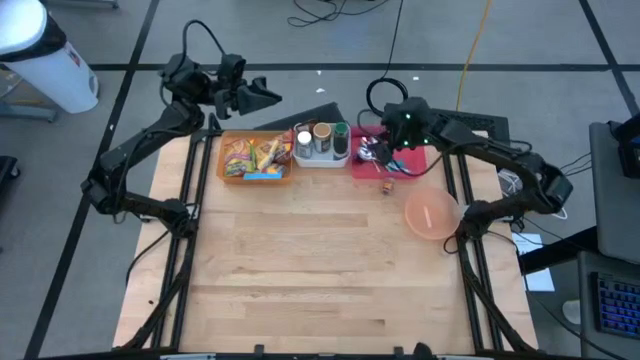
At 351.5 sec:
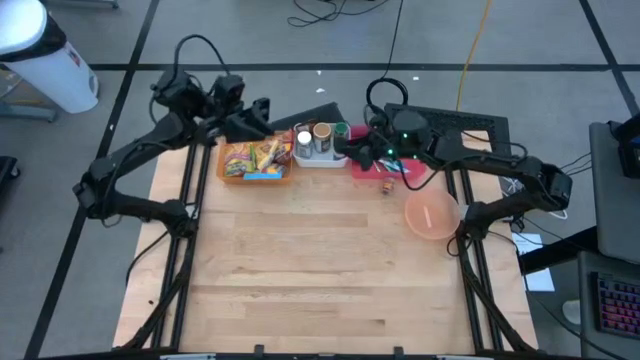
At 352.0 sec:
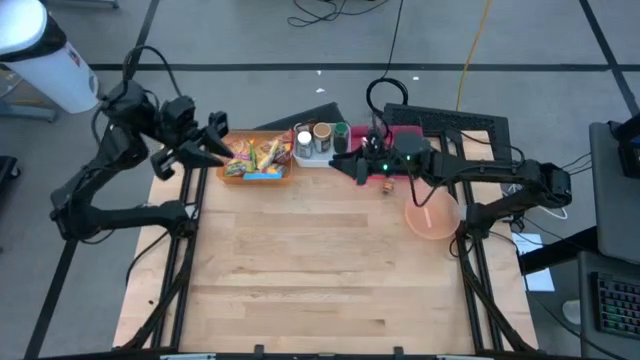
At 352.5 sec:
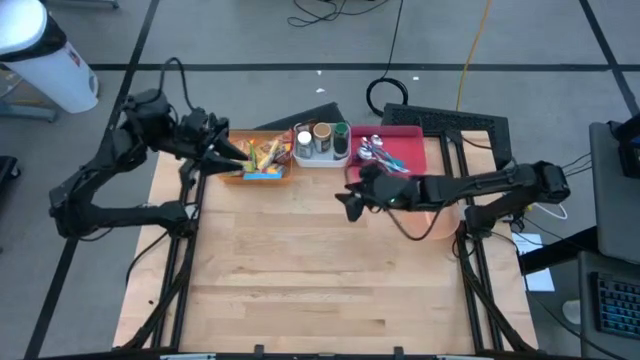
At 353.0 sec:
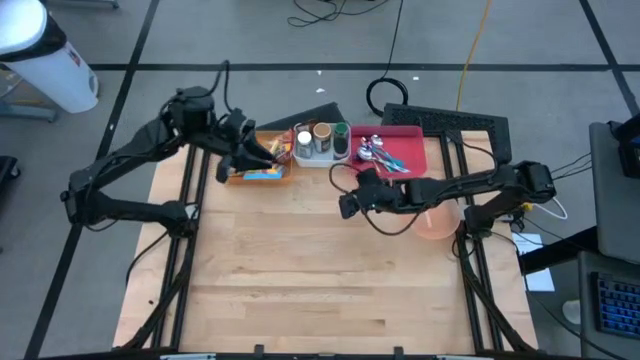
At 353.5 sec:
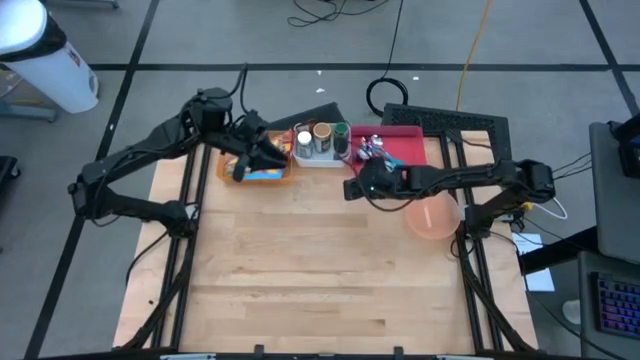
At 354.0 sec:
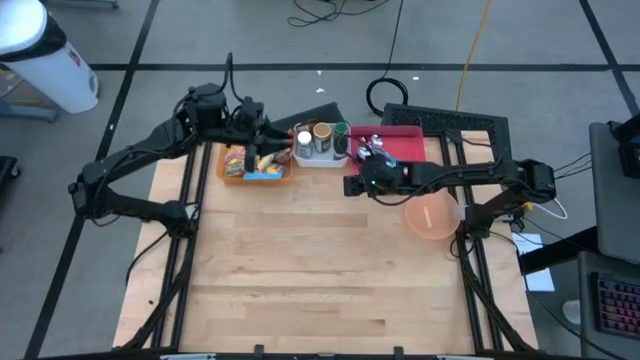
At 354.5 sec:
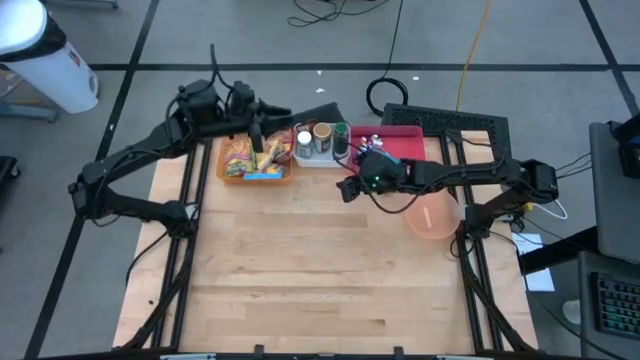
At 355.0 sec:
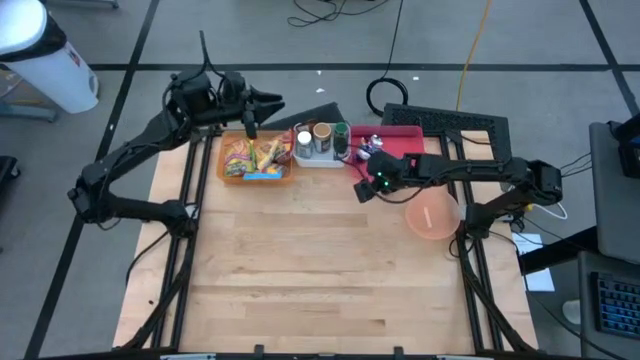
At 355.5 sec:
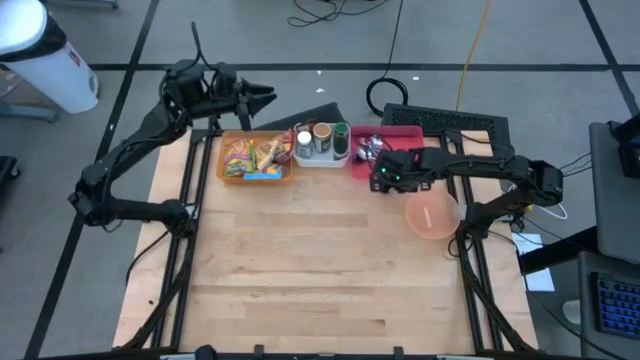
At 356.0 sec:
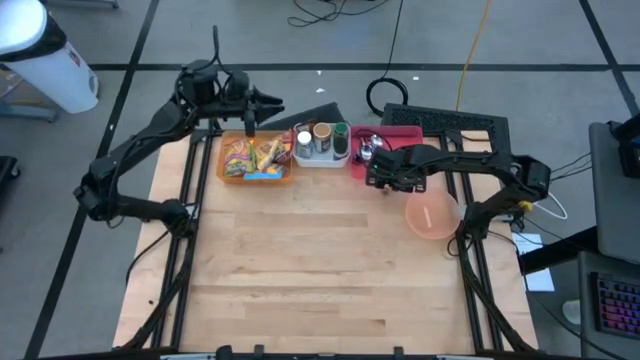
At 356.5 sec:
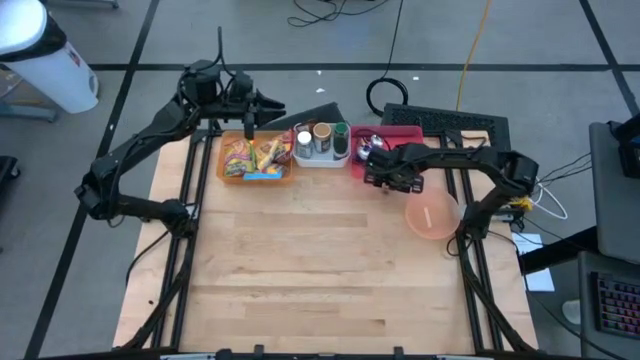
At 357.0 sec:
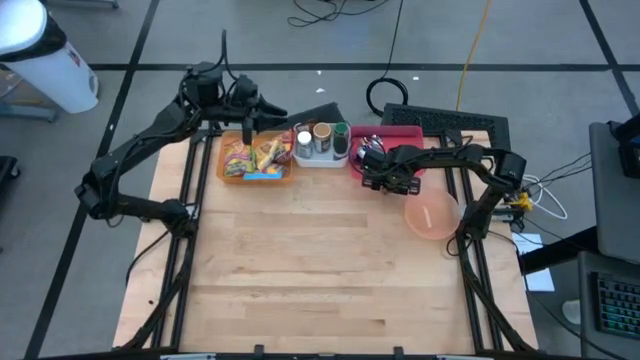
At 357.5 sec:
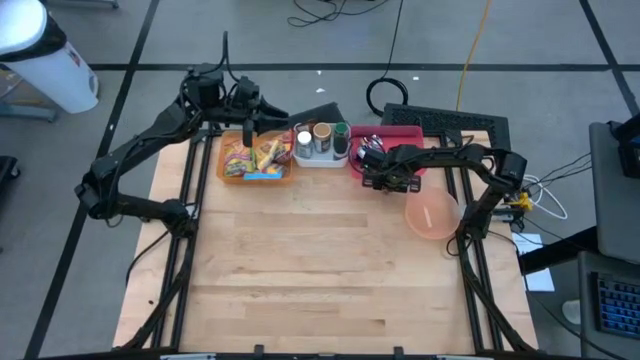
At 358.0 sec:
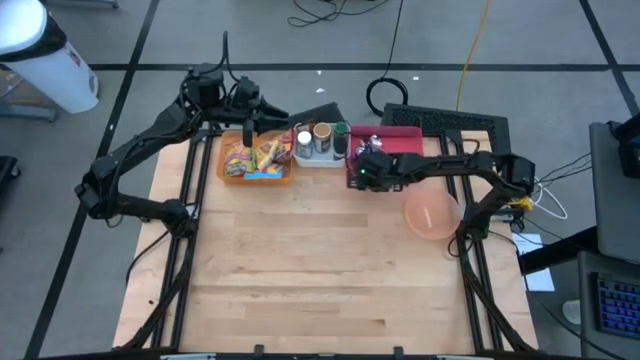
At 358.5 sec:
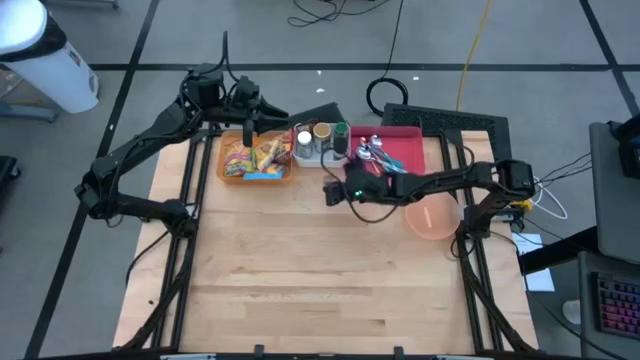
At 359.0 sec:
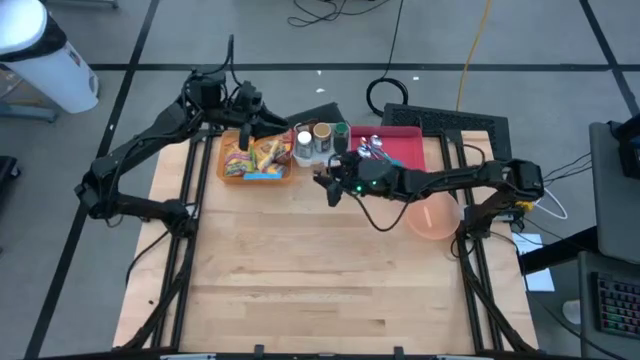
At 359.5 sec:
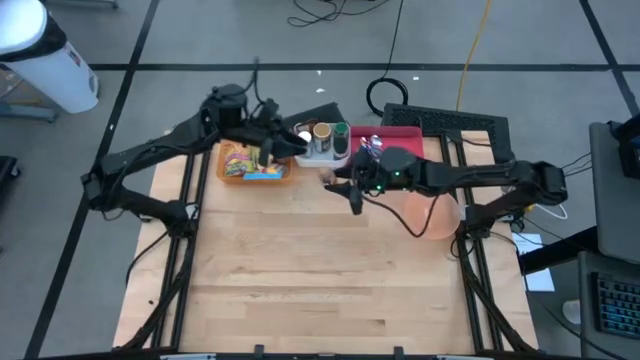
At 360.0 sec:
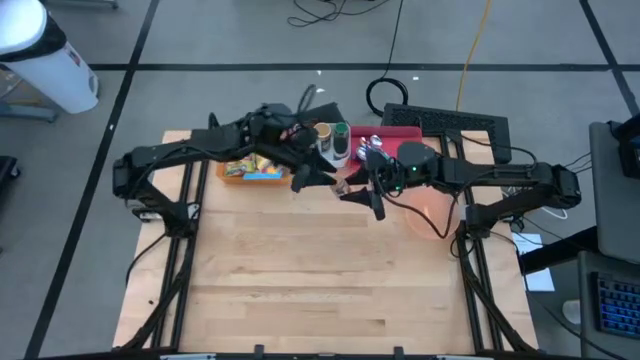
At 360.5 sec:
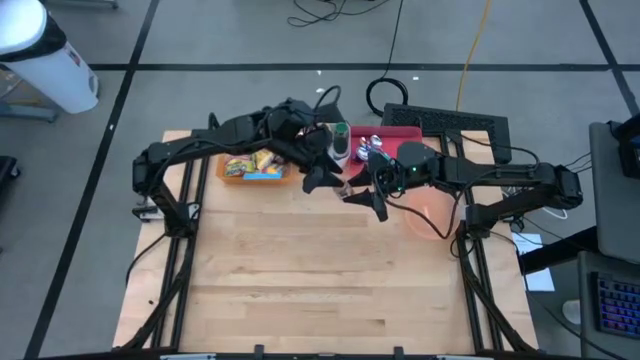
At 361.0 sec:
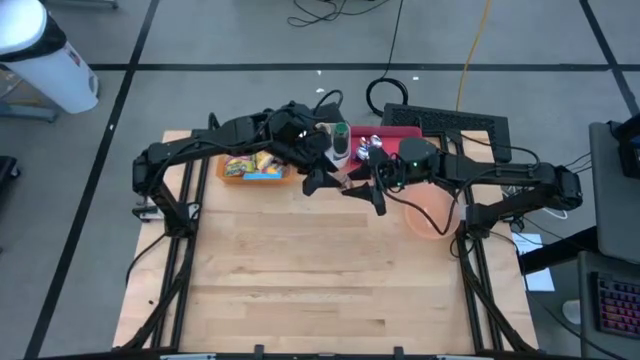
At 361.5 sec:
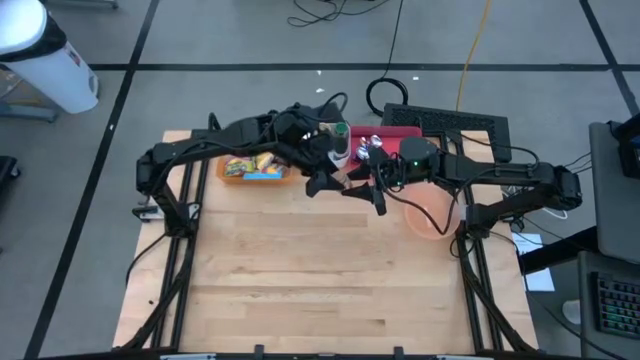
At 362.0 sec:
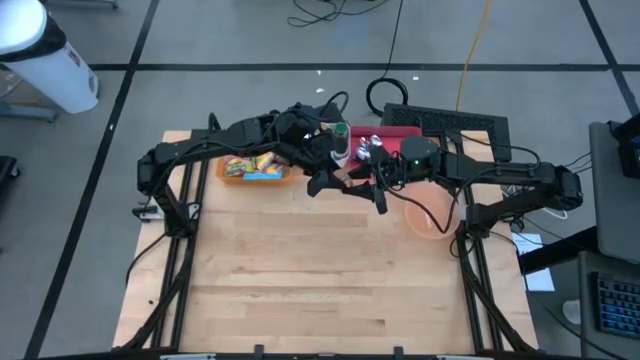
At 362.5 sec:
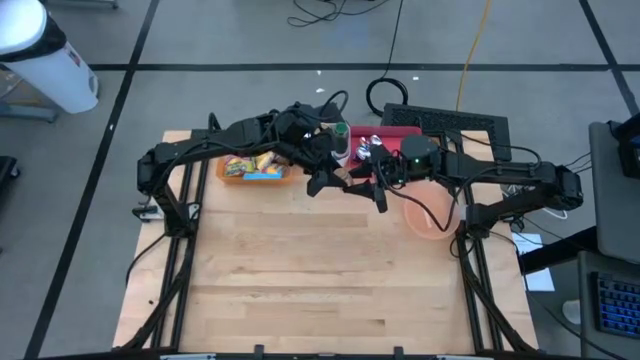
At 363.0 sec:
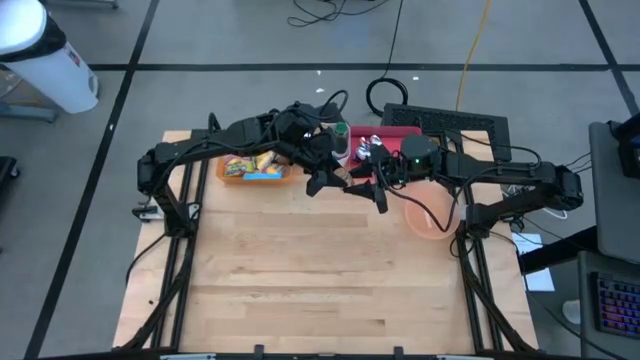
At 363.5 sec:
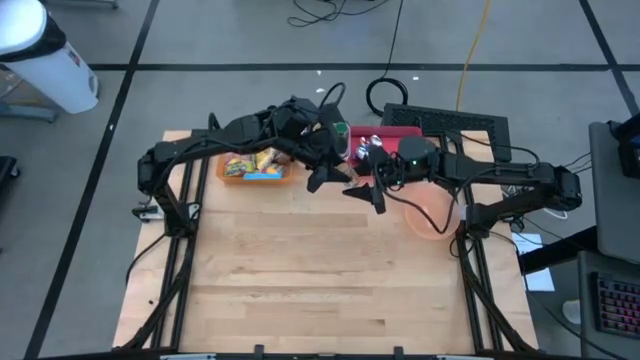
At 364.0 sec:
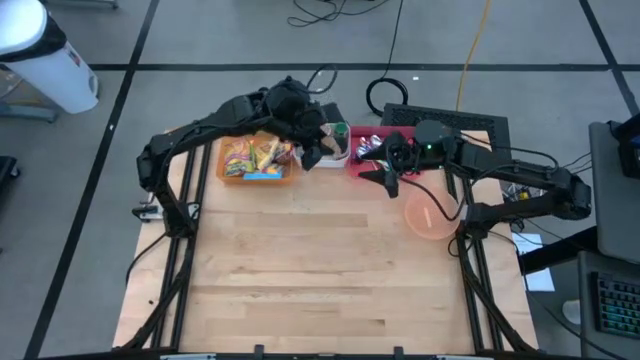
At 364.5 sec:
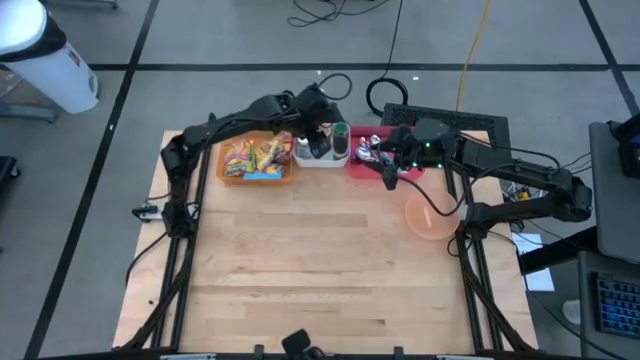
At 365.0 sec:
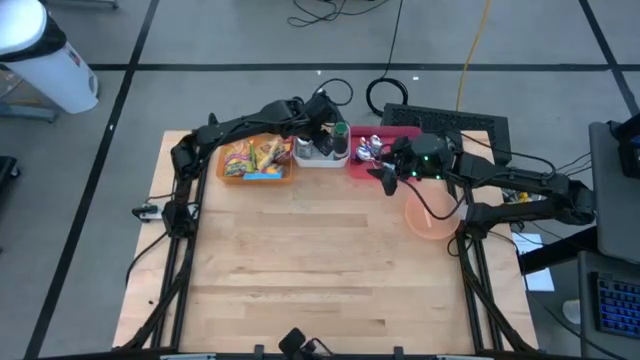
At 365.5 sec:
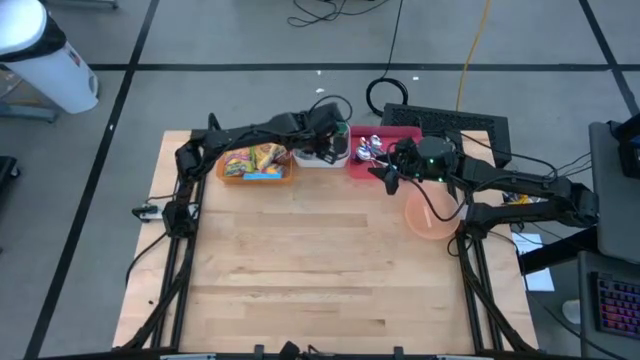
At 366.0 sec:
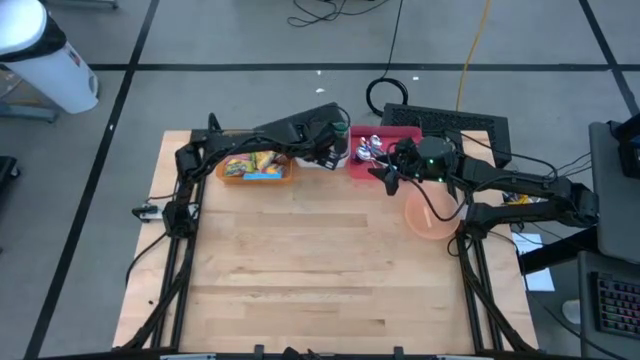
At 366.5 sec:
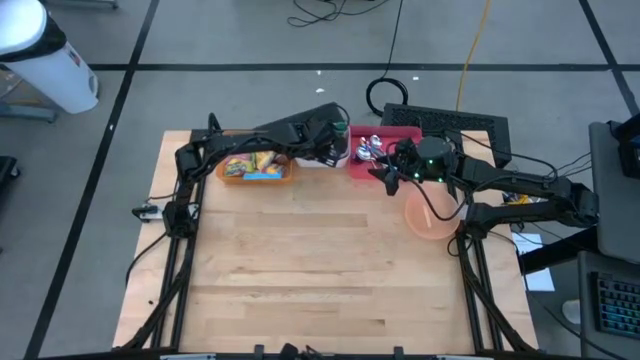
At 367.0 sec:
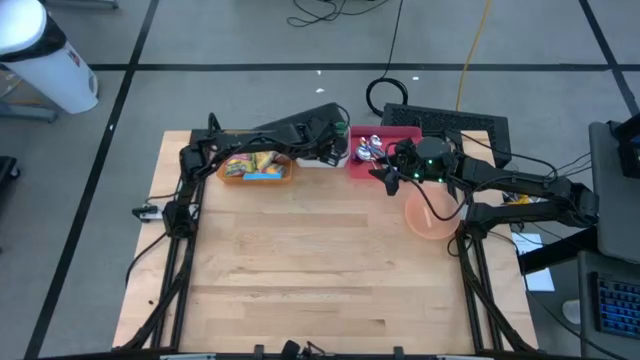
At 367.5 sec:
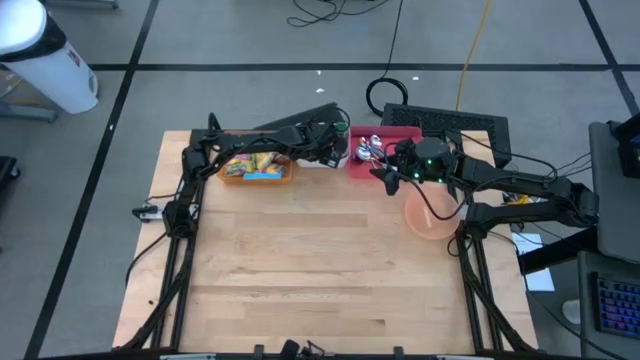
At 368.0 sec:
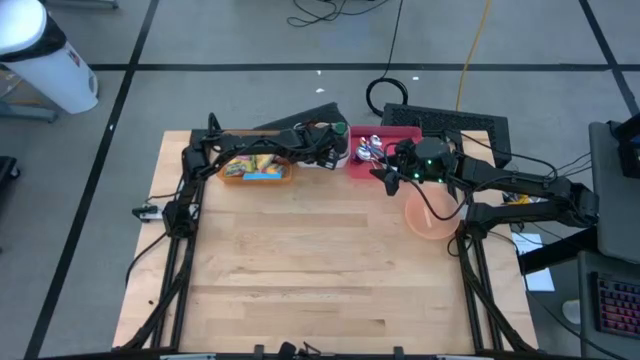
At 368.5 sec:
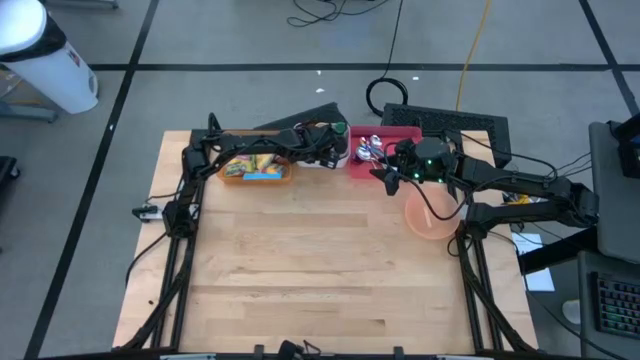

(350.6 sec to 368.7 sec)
Task: Pick & Place Food Item
Put brown seasoning bottle into the white bin
